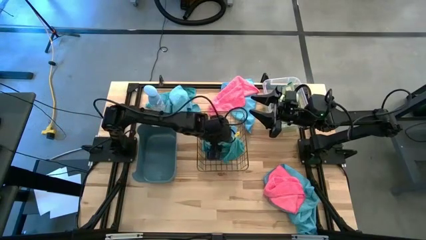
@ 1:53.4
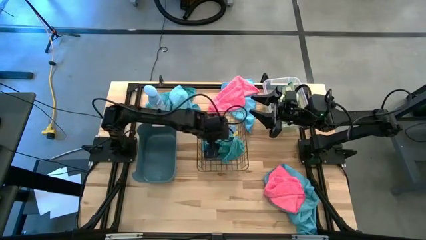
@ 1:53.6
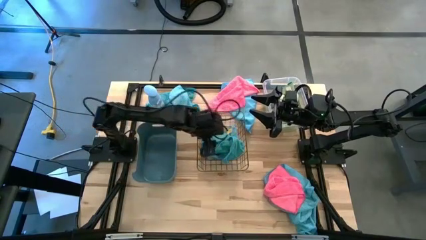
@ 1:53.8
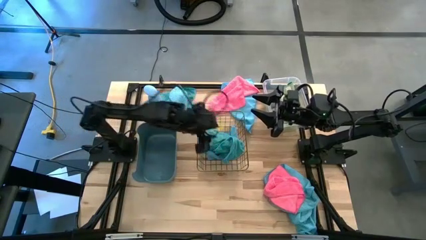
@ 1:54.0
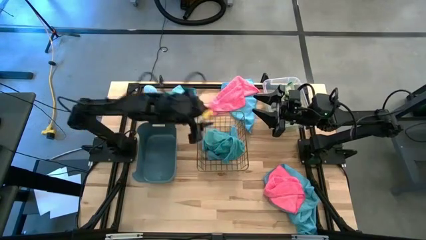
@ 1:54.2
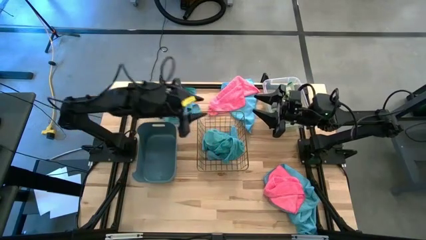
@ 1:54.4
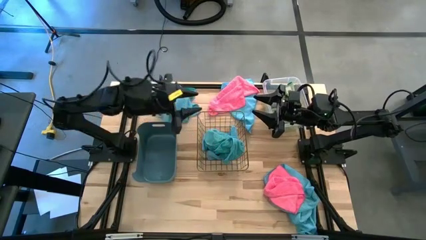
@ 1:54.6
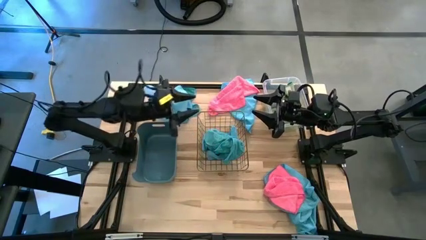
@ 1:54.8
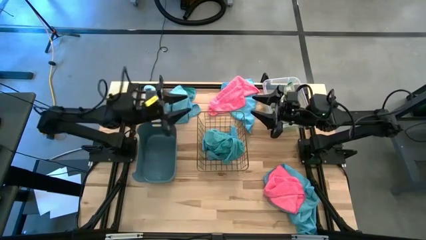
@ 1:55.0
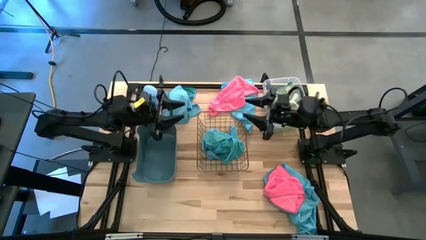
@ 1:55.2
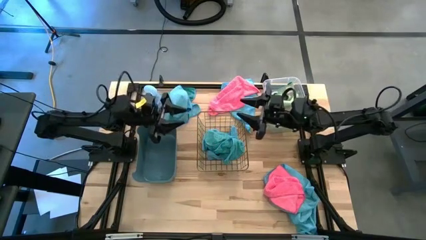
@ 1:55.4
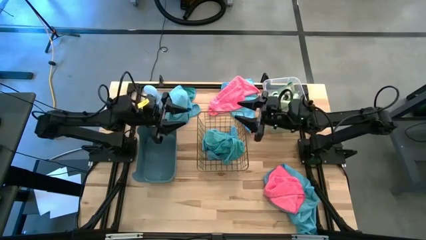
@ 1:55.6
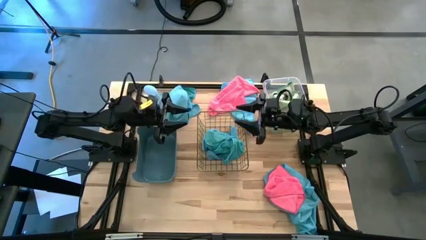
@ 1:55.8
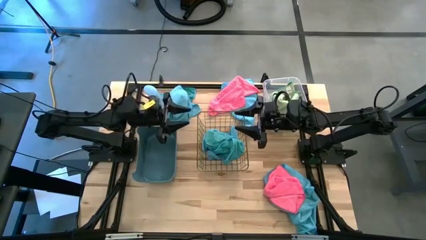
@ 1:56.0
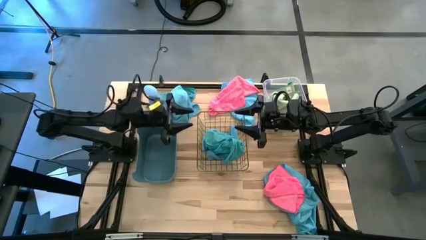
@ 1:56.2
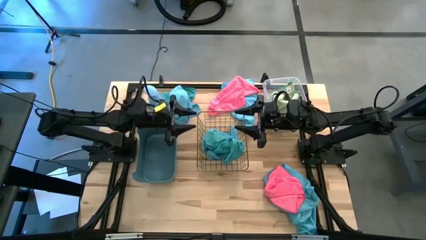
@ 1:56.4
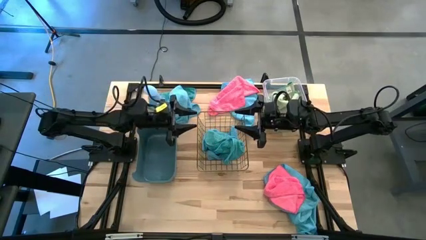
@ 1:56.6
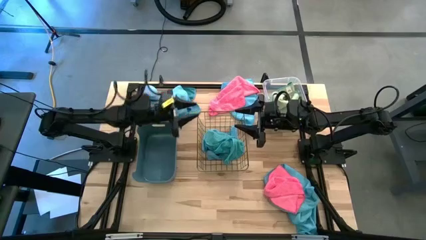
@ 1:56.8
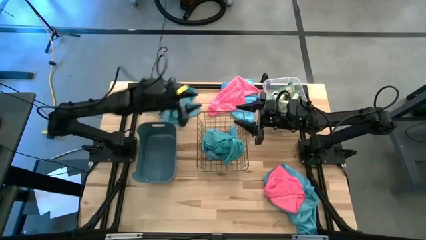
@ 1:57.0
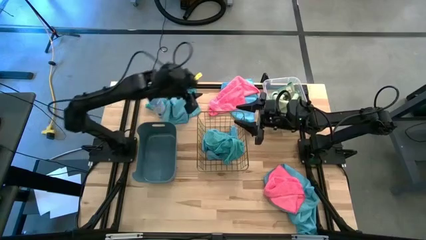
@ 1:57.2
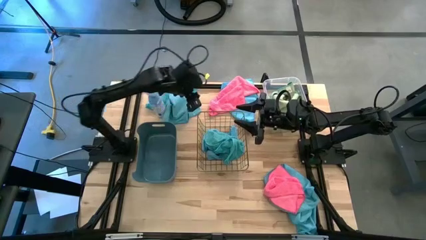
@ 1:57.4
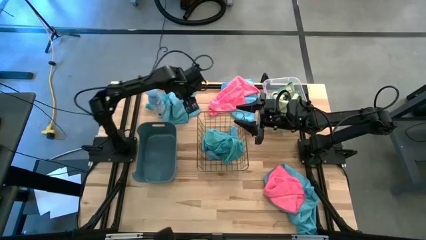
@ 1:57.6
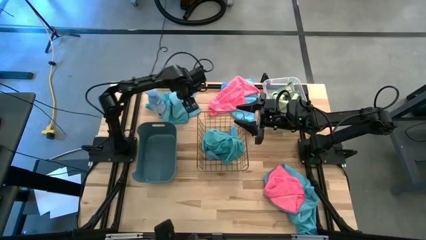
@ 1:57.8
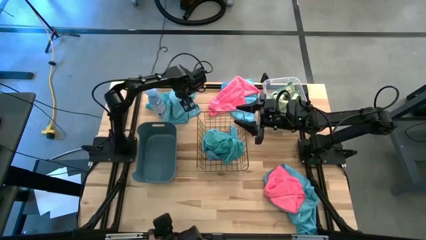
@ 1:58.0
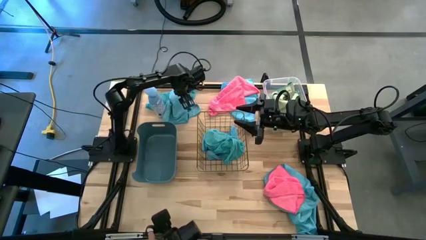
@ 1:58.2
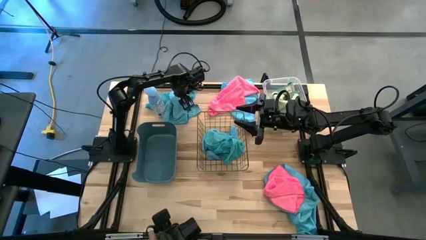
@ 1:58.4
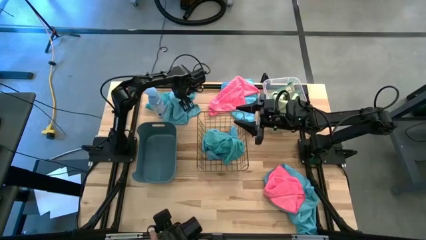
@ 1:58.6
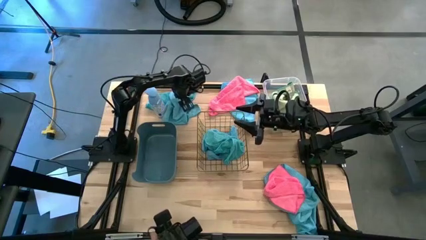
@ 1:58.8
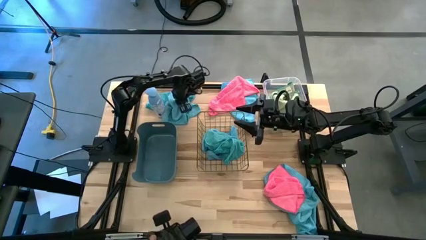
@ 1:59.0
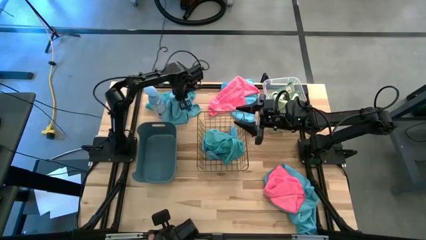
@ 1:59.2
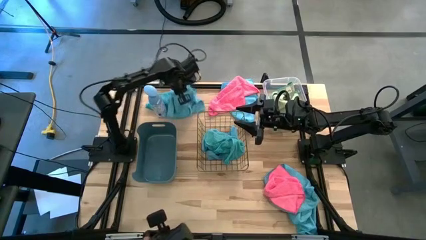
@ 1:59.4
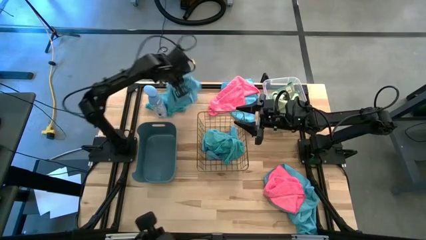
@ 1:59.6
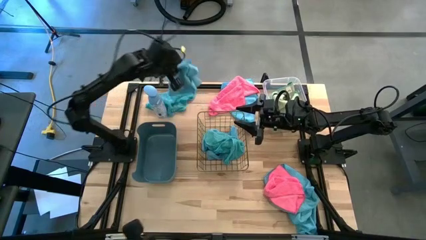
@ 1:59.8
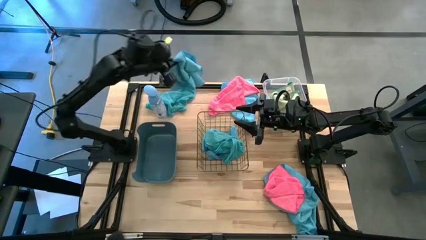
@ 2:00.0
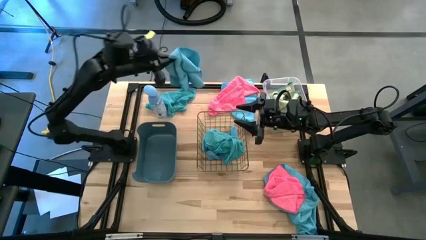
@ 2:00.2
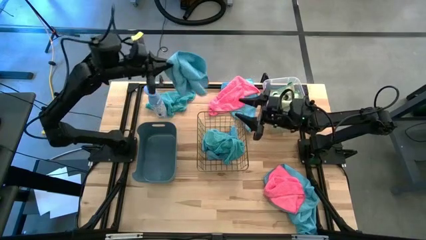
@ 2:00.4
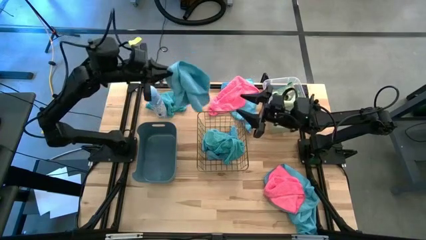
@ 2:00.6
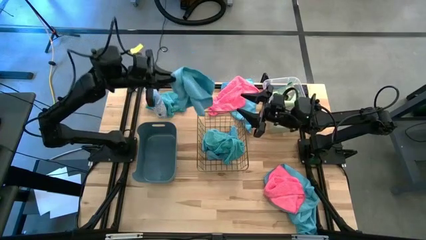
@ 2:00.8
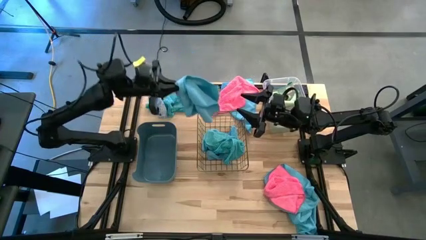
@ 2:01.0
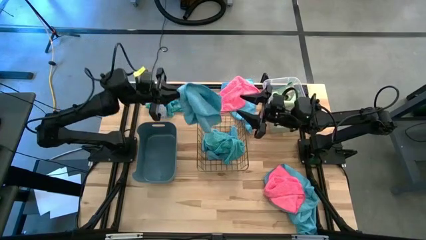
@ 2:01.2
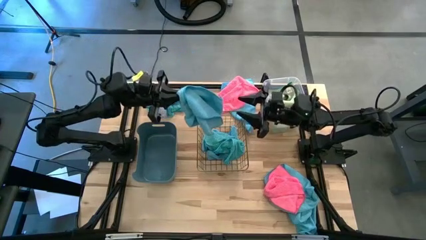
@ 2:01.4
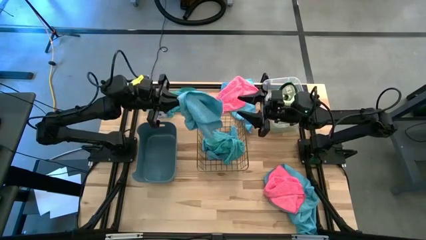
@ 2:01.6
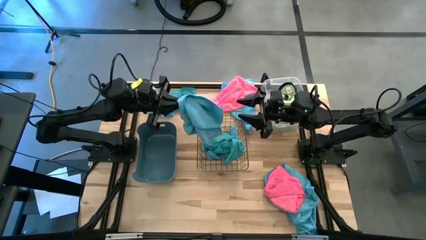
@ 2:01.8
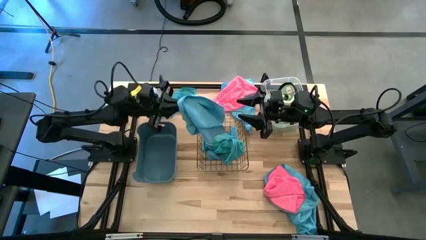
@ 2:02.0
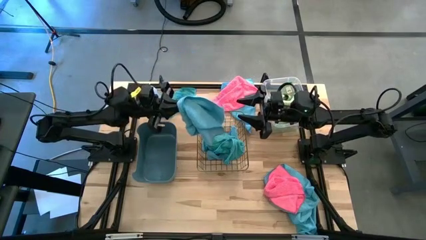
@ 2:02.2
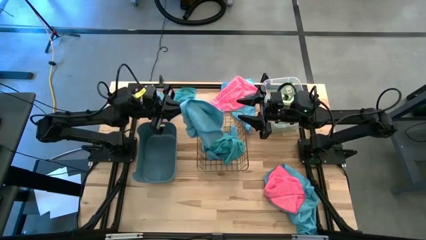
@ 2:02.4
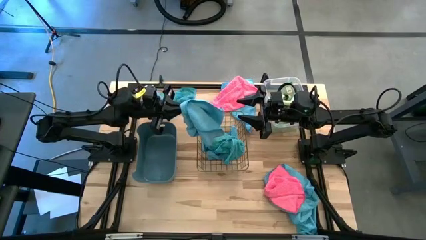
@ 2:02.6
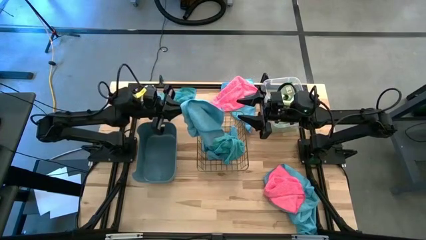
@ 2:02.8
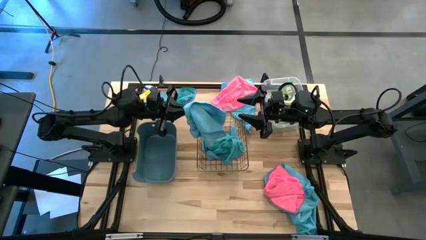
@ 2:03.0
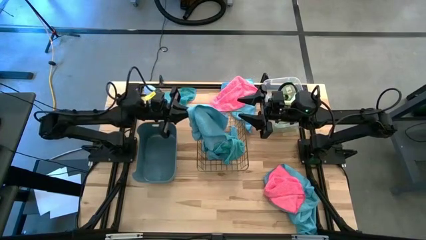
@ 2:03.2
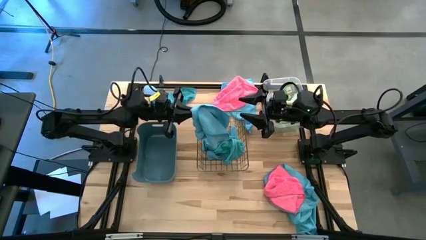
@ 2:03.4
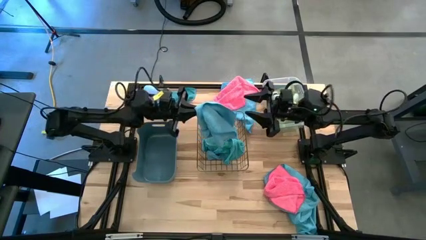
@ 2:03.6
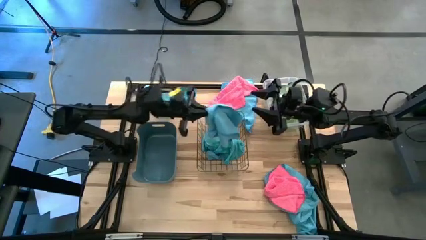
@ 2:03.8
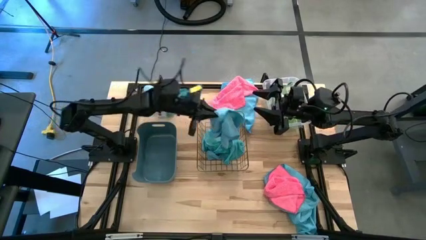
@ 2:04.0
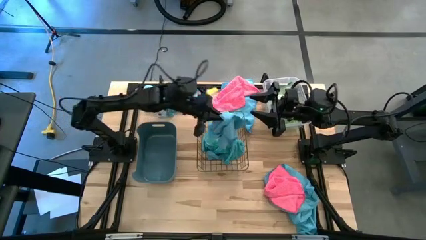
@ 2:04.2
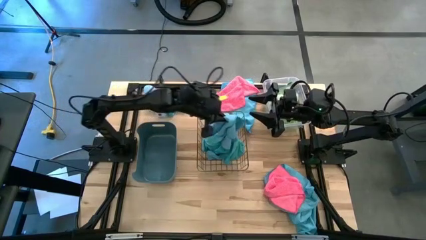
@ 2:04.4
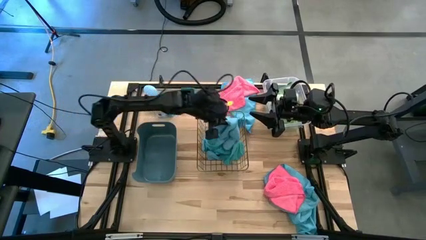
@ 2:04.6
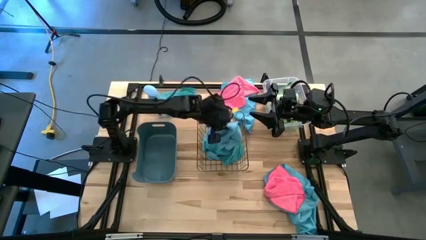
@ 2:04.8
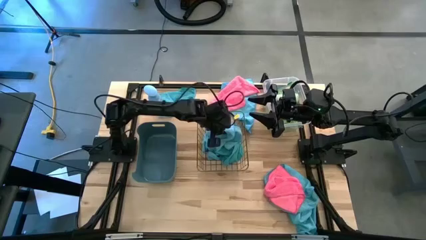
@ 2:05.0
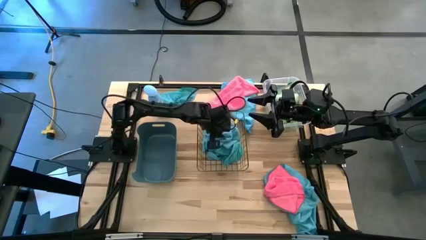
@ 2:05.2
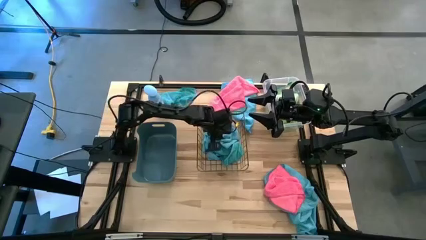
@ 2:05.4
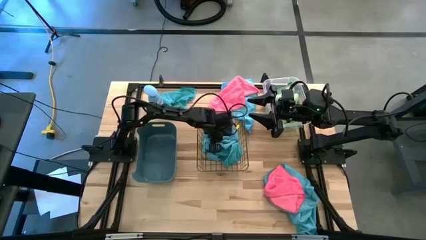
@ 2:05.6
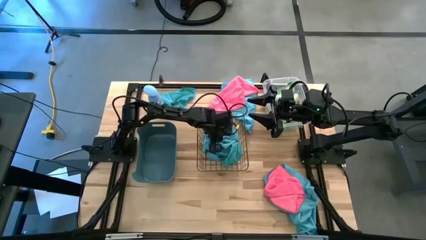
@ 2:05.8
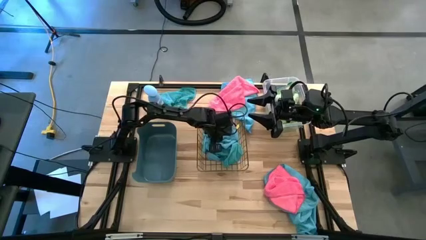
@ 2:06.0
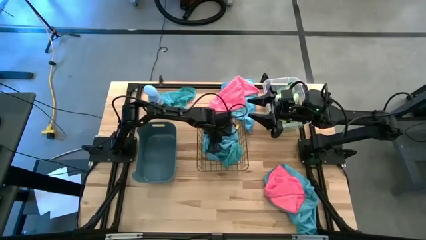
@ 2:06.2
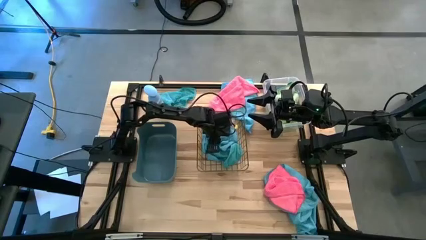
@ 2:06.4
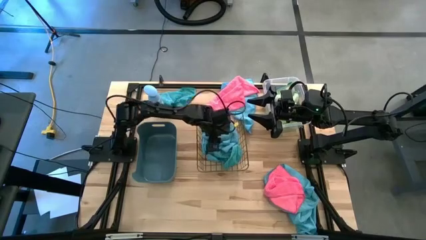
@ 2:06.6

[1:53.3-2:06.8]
Task: Sort microfiber towel by color & place in baskets
Put the blue towel into the wire basket
